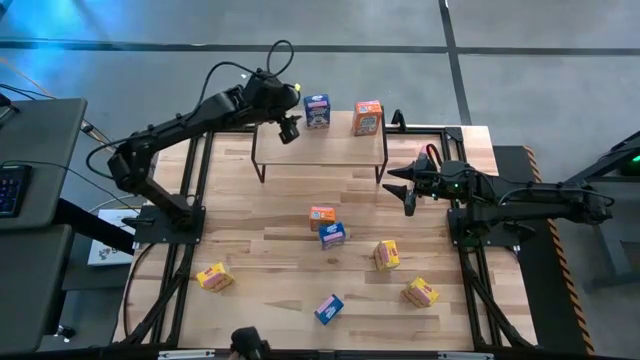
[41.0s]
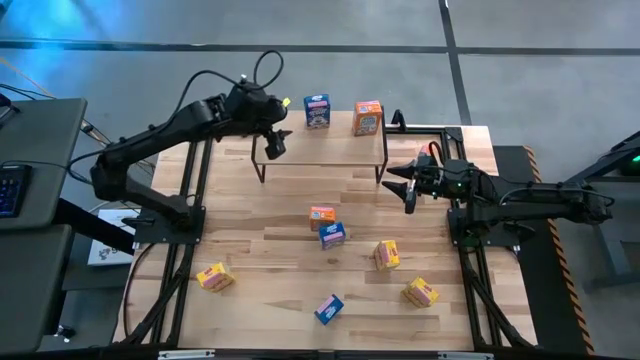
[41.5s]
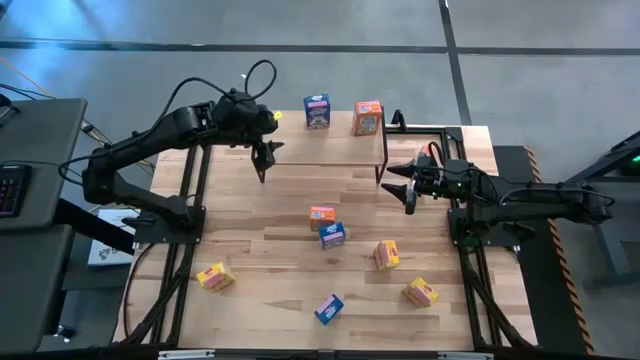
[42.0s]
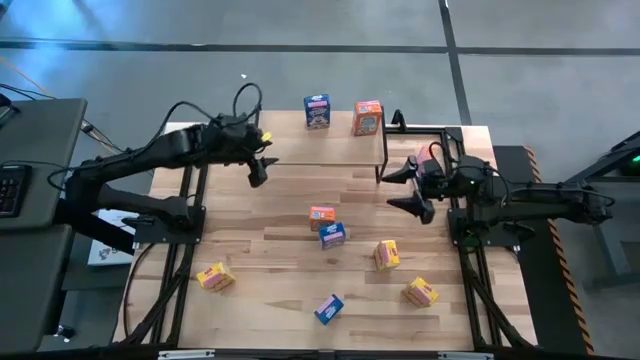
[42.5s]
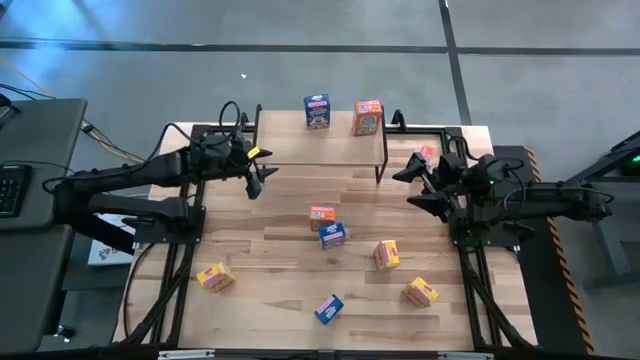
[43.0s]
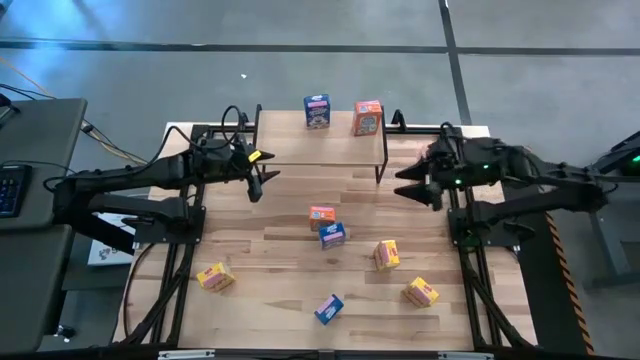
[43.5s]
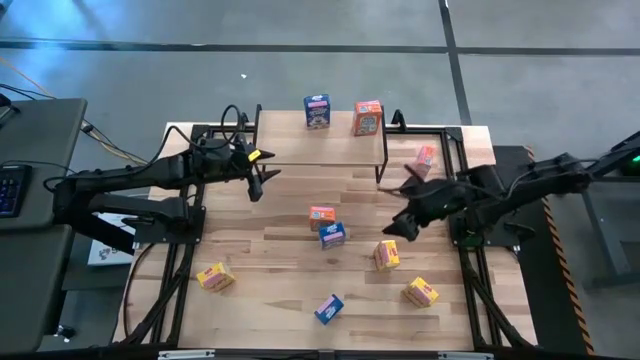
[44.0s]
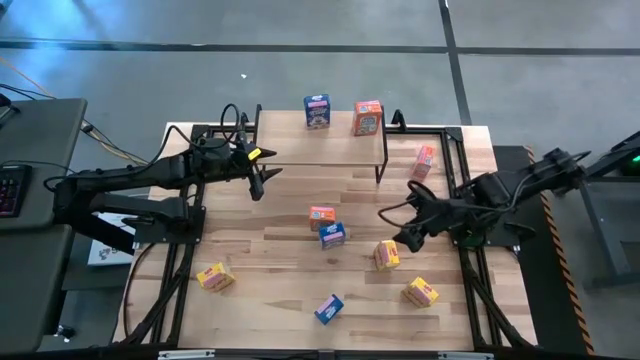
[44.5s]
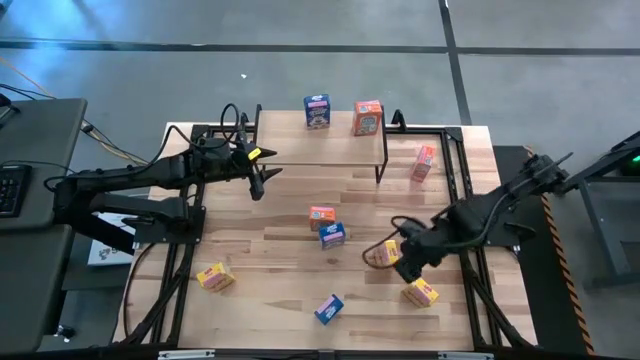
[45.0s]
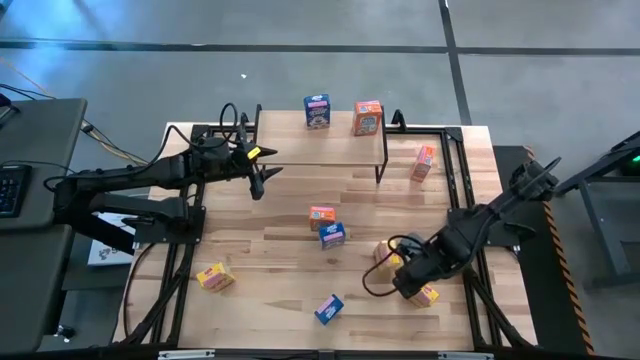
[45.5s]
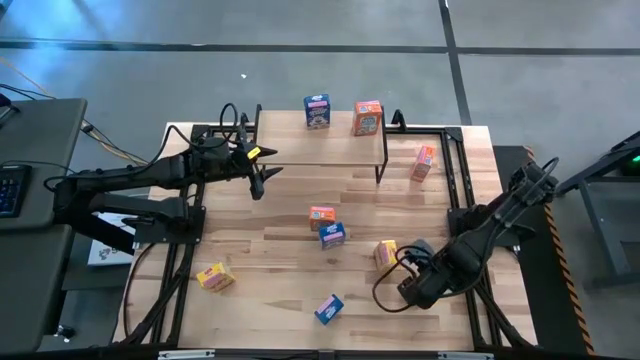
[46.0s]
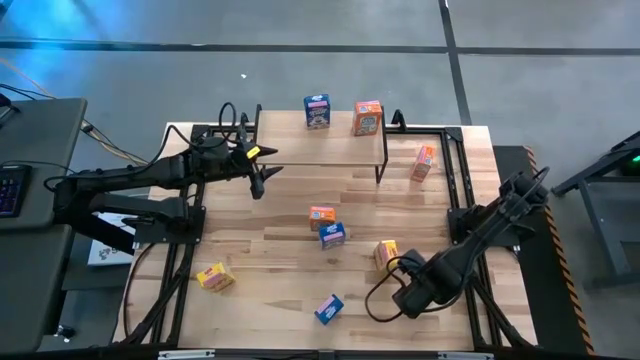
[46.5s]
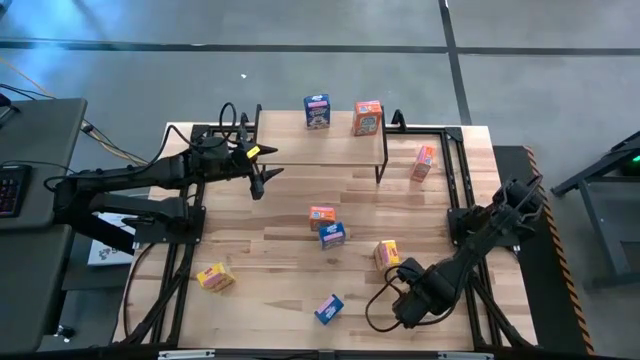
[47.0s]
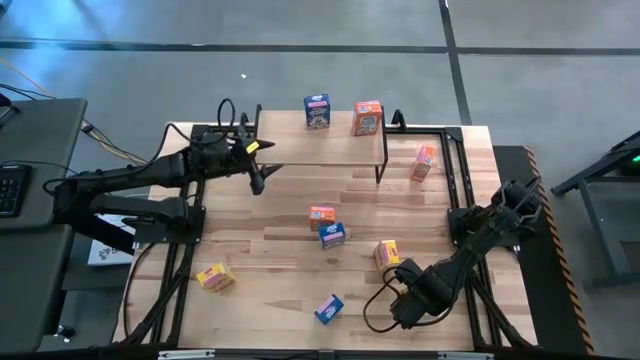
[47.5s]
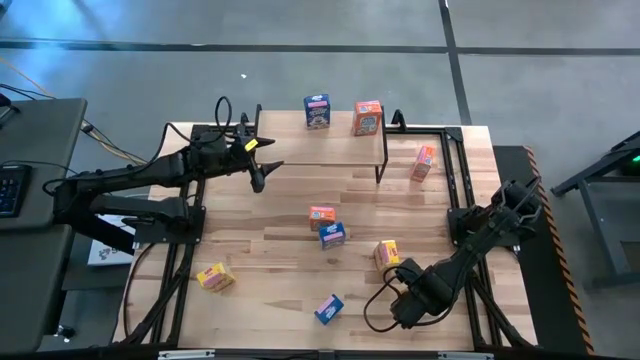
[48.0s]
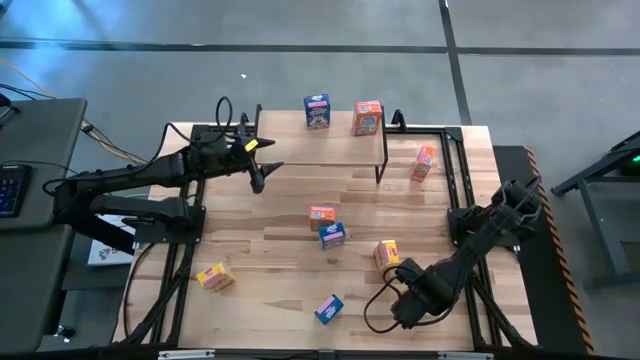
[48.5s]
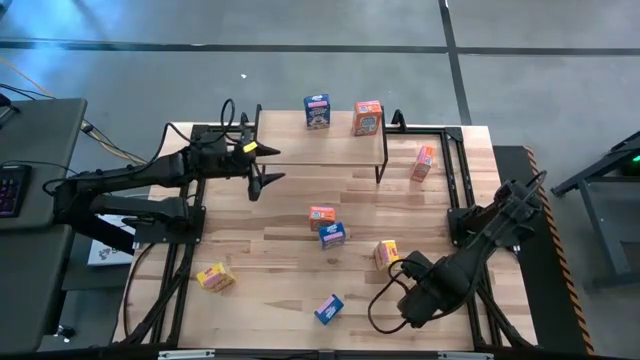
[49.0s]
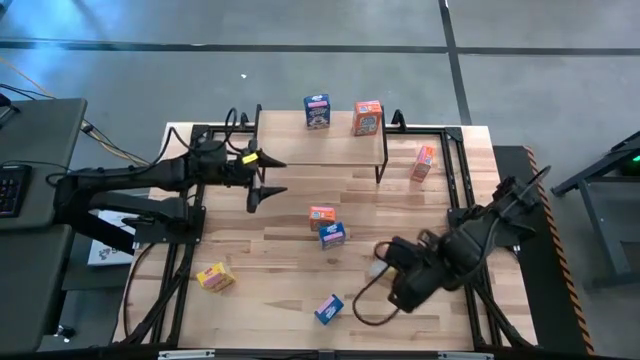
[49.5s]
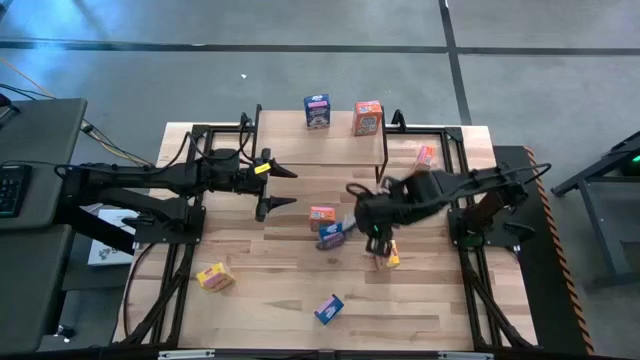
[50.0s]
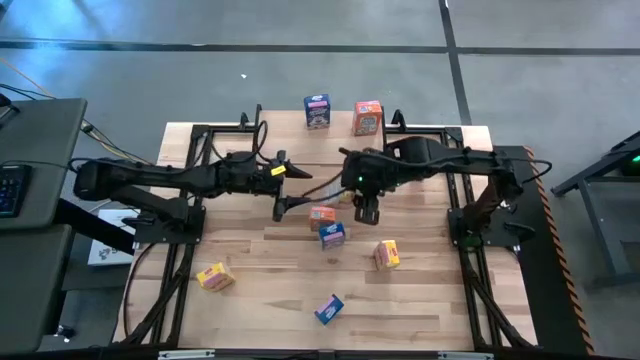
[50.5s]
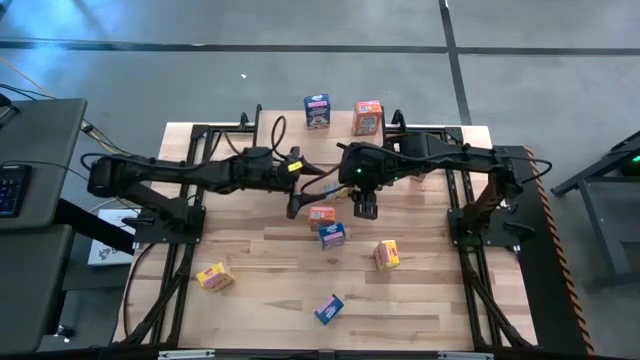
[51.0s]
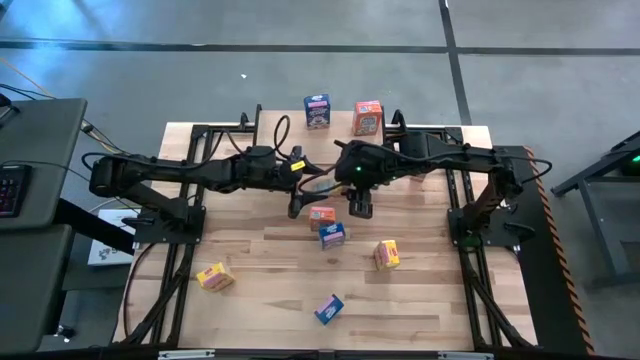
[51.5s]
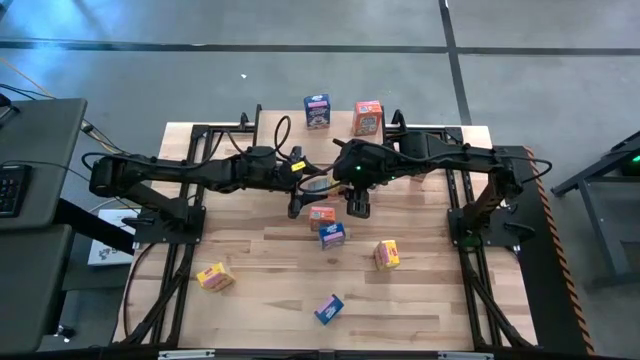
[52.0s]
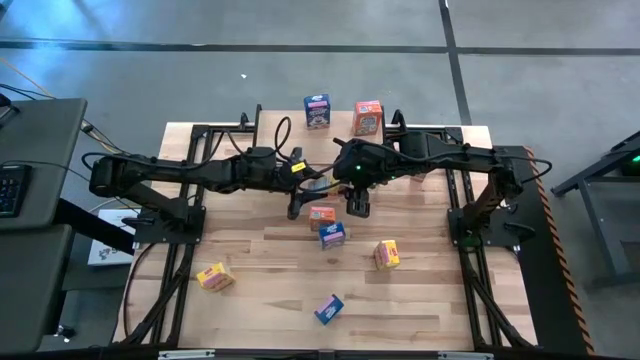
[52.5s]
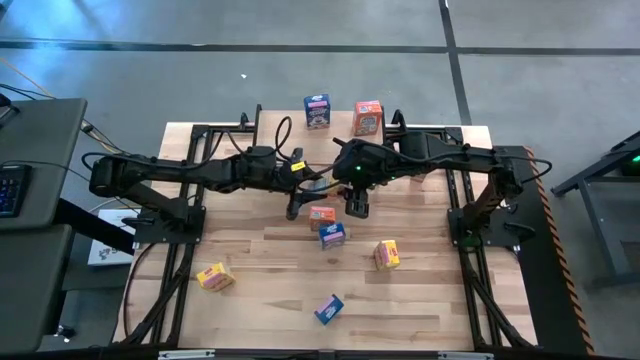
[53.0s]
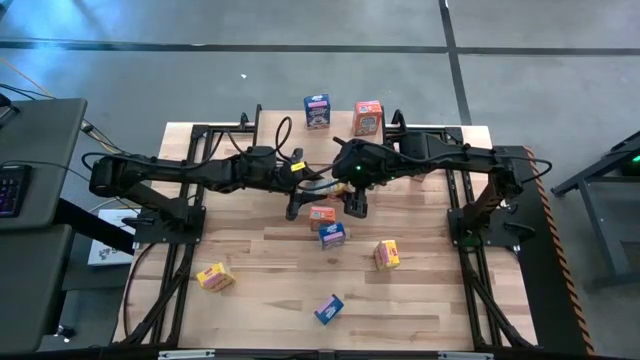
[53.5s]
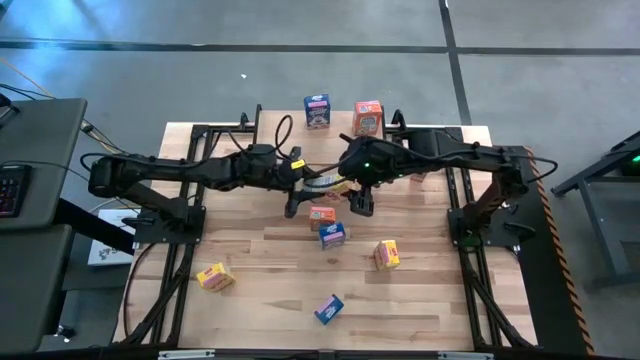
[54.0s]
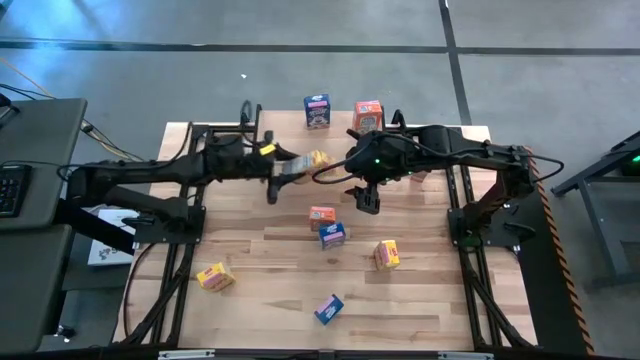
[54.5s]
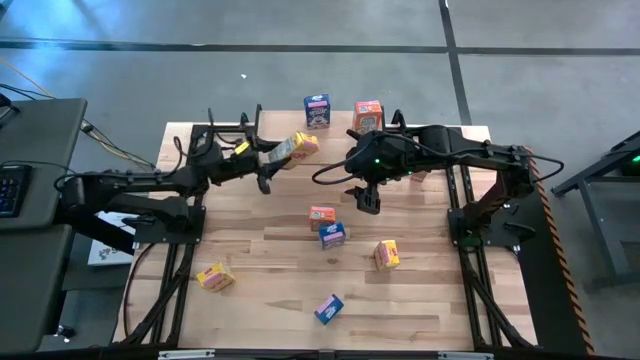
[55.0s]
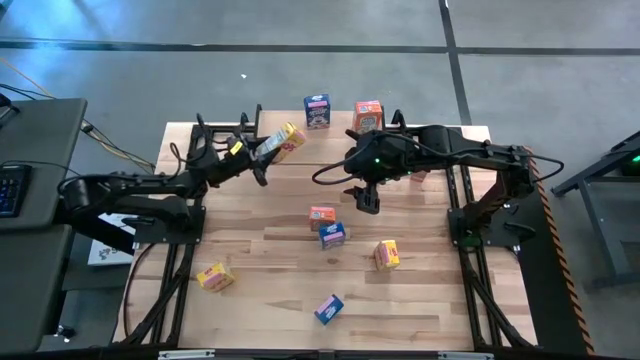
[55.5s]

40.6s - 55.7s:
Task: Stack cereal on shelf
Put the bottom right yellow cereal box on the shelf

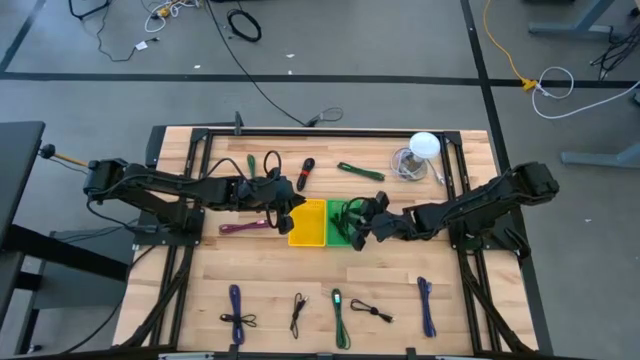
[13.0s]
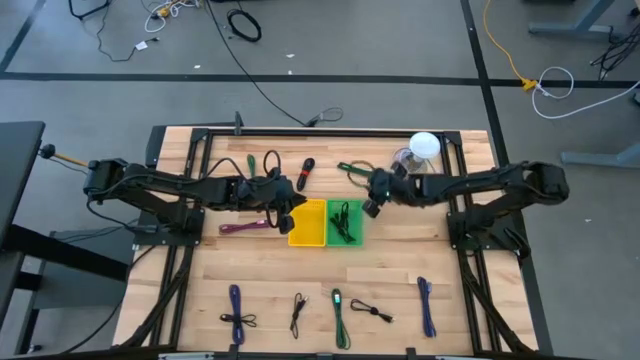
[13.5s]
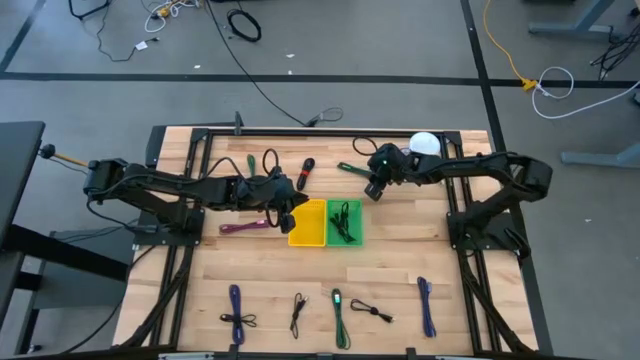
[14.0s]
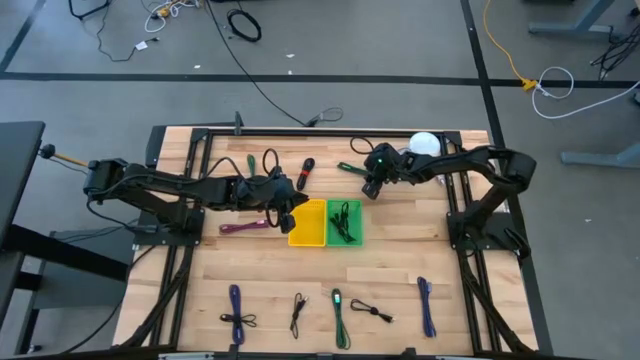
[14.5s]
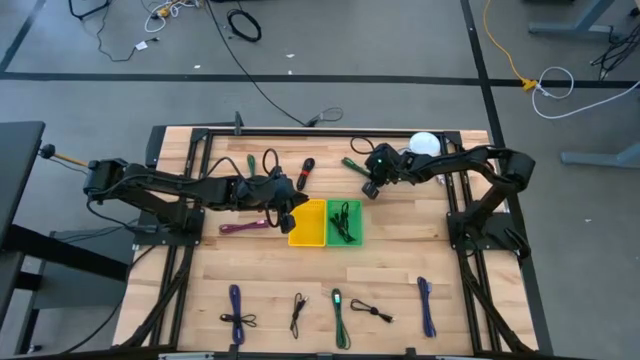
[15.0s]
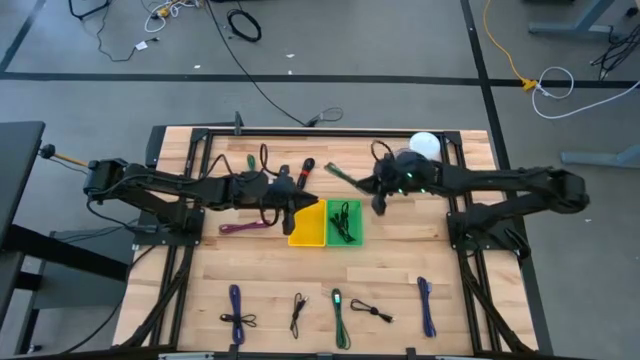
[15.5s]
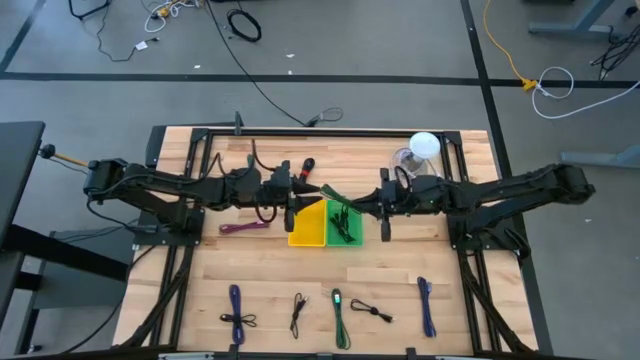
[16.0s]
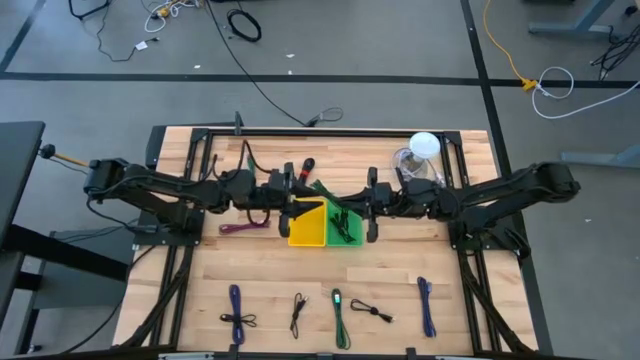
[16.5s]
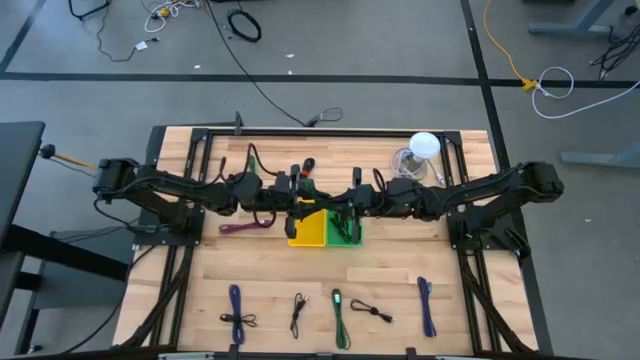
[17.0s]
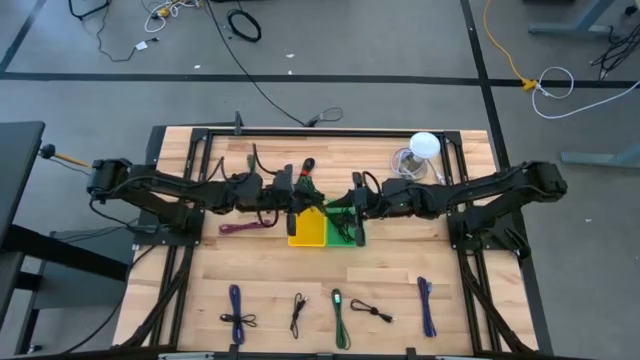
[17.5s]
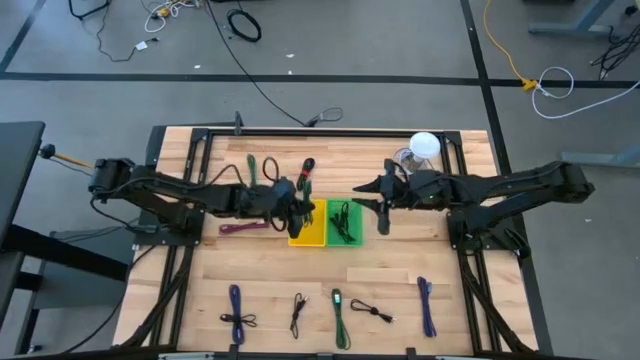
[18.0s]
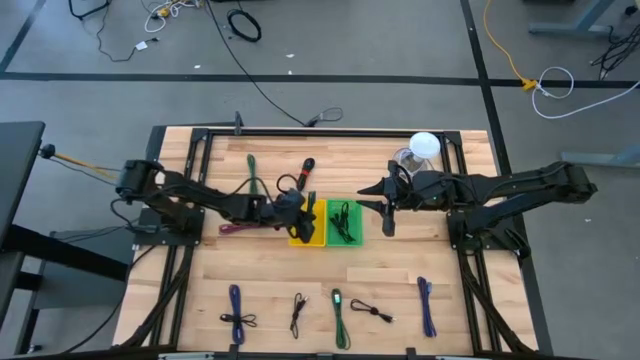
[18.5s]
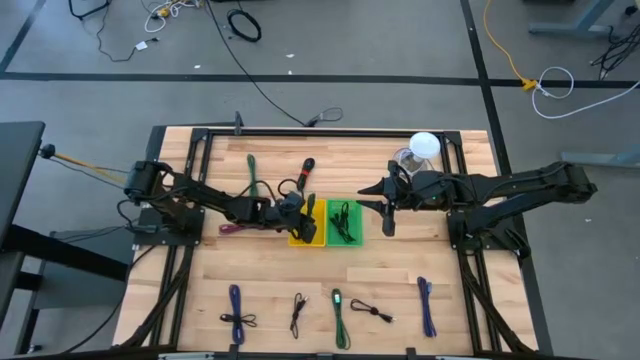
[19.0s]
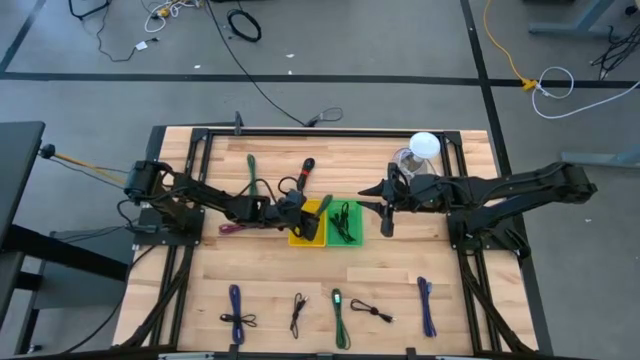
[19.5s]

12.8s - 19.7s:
Task: Pick & Place USB Port
Put the green charger cable into the yellow basket
